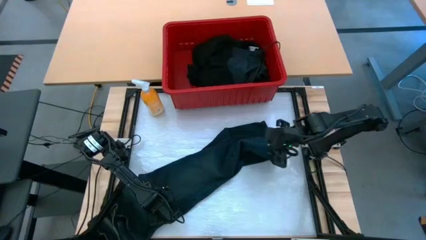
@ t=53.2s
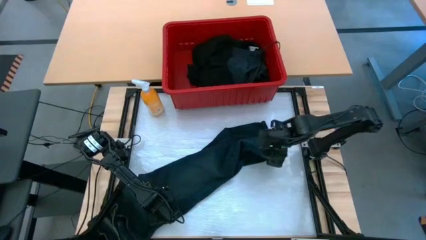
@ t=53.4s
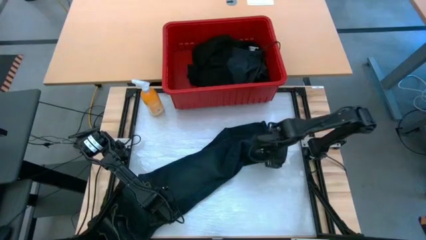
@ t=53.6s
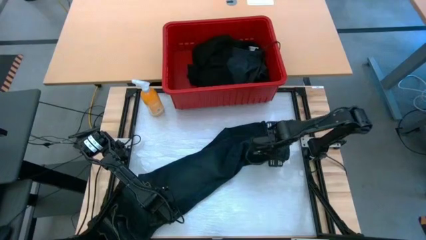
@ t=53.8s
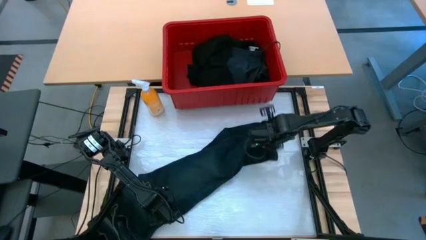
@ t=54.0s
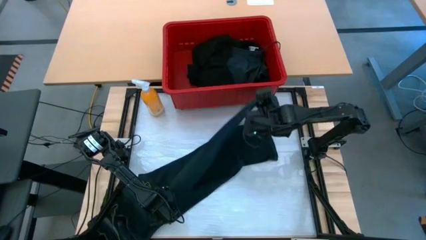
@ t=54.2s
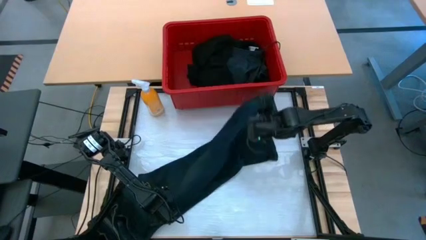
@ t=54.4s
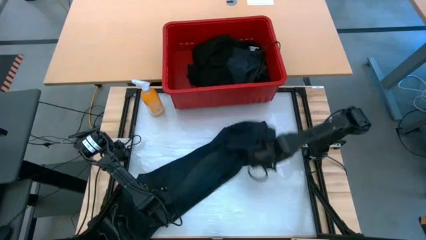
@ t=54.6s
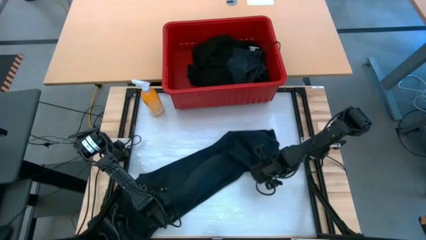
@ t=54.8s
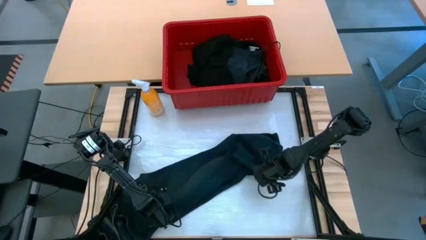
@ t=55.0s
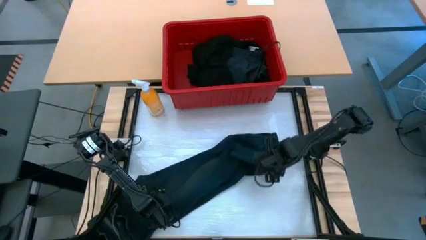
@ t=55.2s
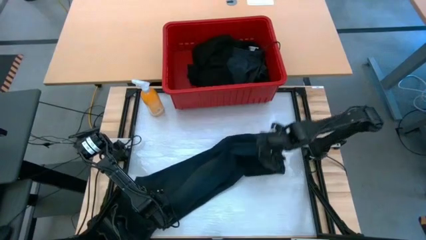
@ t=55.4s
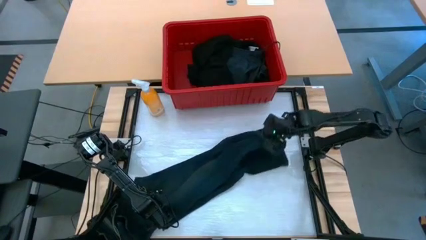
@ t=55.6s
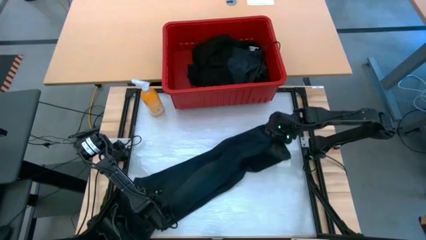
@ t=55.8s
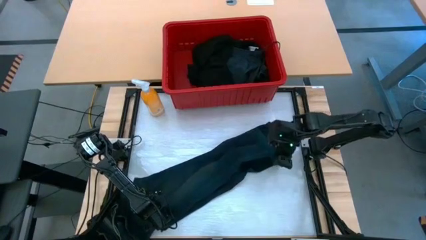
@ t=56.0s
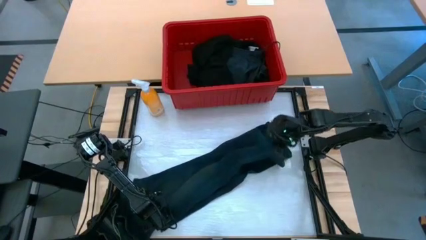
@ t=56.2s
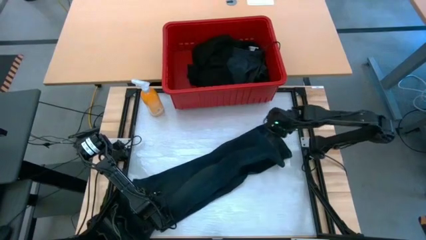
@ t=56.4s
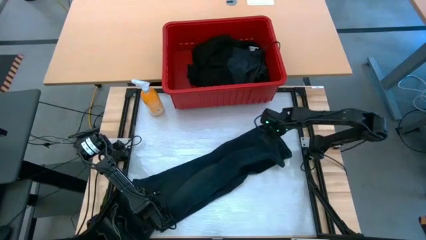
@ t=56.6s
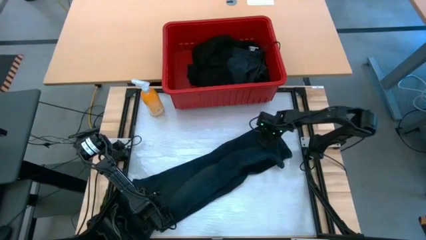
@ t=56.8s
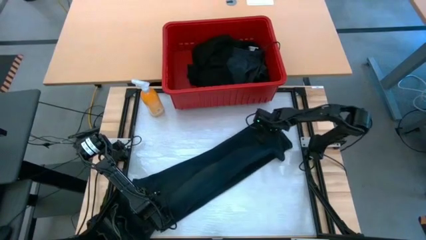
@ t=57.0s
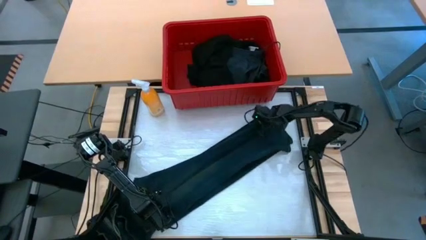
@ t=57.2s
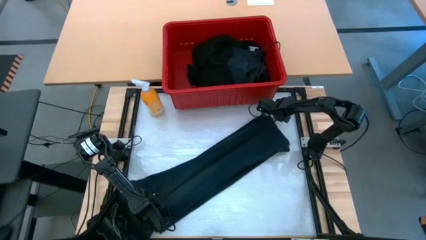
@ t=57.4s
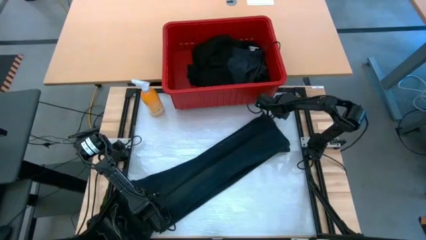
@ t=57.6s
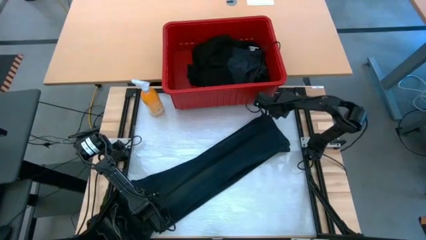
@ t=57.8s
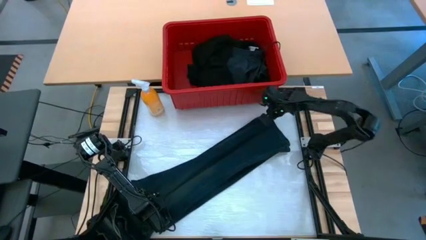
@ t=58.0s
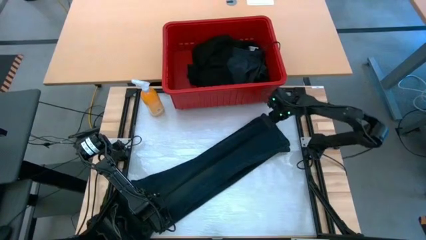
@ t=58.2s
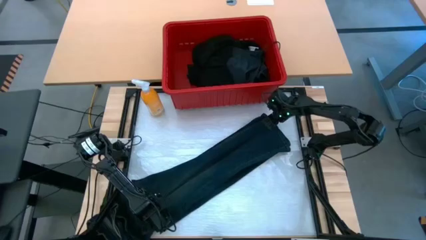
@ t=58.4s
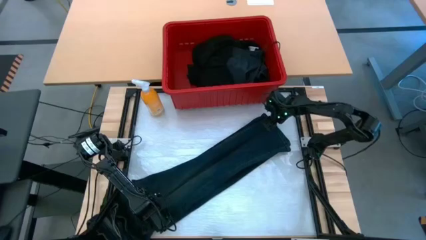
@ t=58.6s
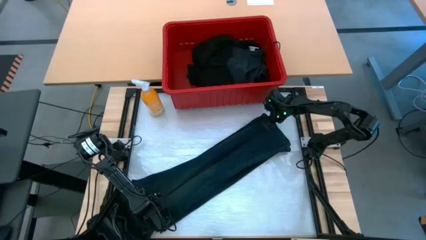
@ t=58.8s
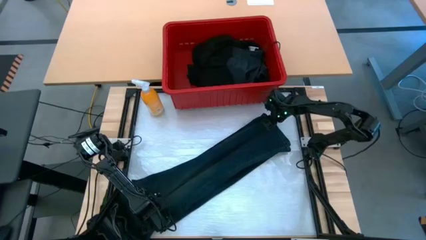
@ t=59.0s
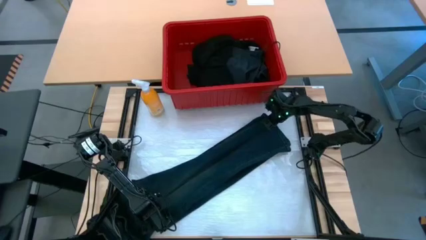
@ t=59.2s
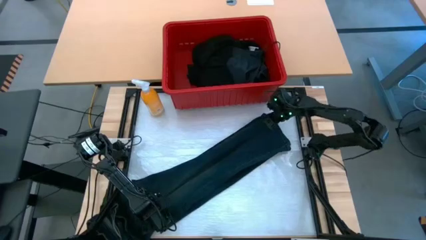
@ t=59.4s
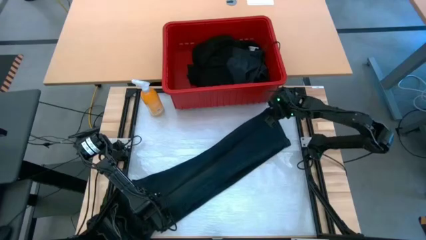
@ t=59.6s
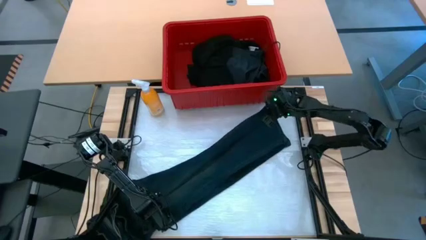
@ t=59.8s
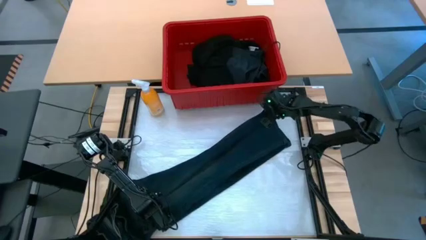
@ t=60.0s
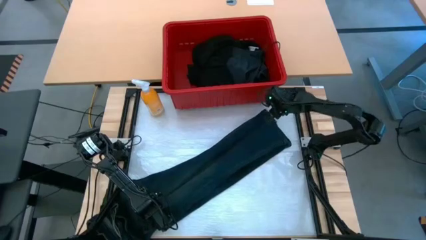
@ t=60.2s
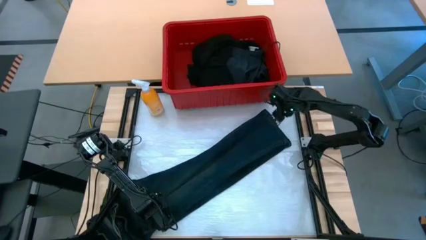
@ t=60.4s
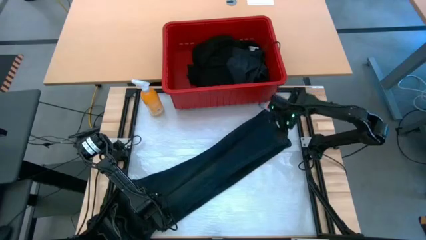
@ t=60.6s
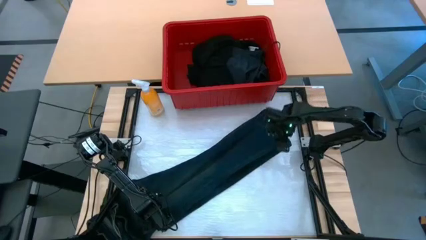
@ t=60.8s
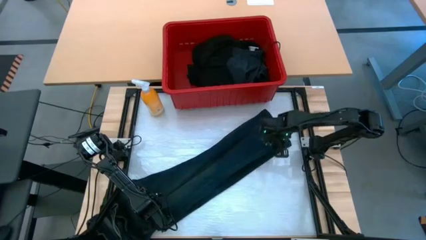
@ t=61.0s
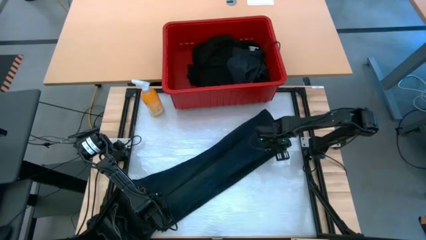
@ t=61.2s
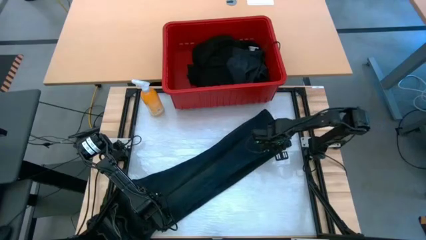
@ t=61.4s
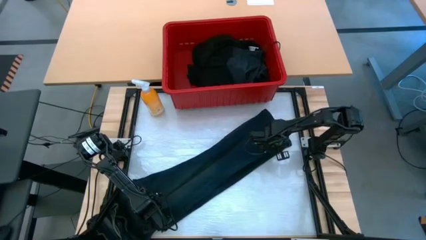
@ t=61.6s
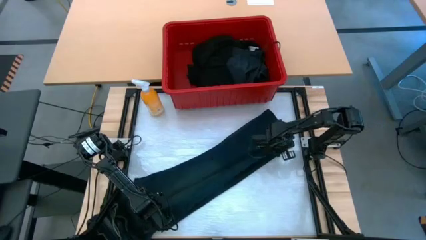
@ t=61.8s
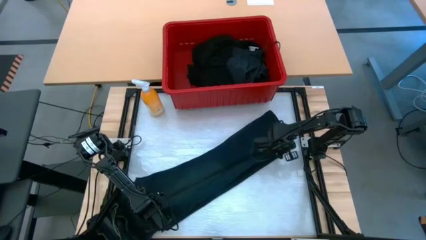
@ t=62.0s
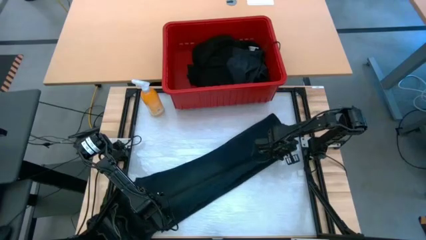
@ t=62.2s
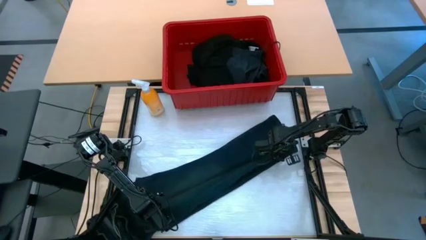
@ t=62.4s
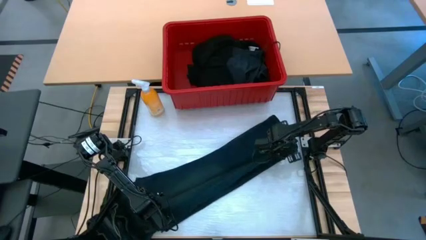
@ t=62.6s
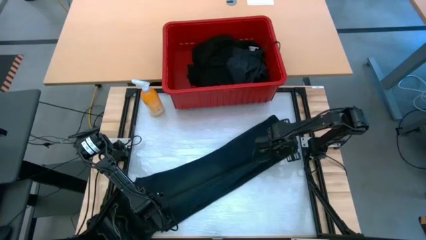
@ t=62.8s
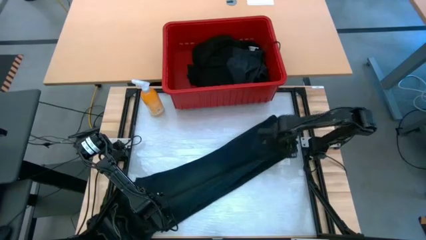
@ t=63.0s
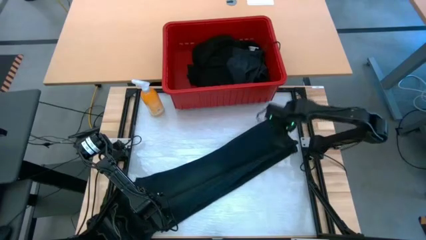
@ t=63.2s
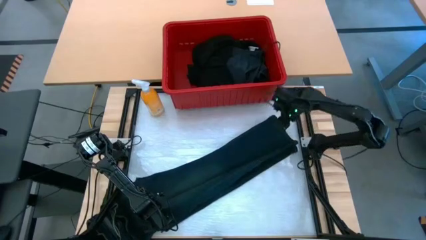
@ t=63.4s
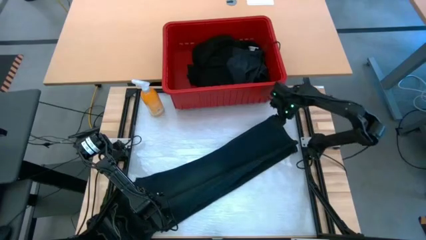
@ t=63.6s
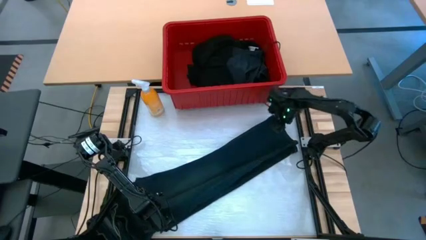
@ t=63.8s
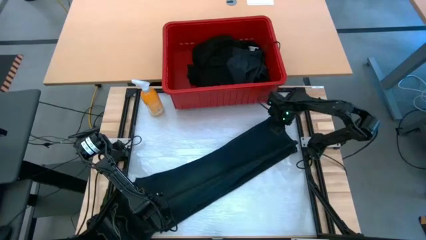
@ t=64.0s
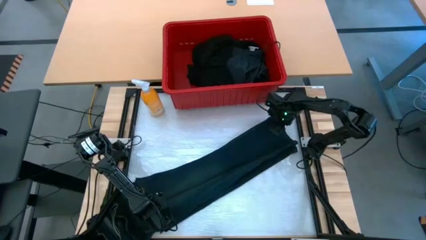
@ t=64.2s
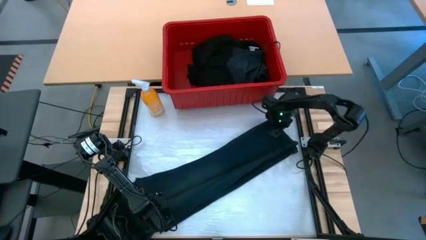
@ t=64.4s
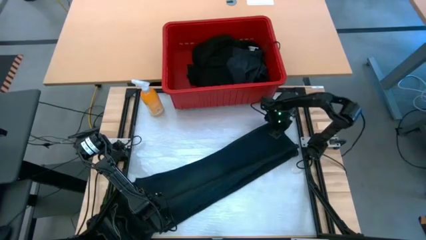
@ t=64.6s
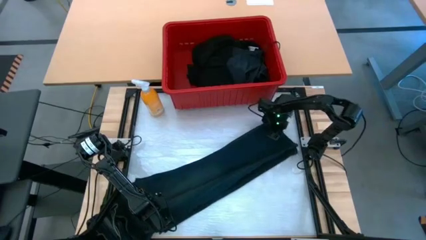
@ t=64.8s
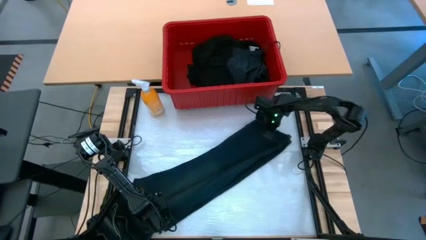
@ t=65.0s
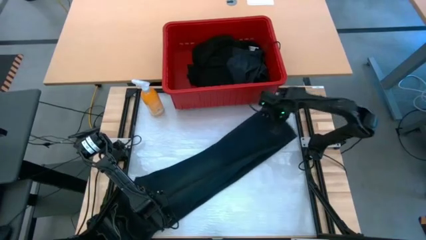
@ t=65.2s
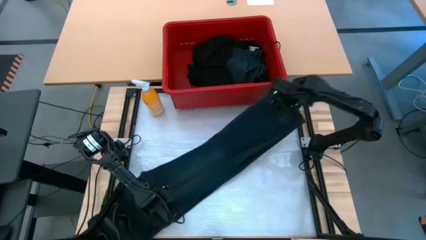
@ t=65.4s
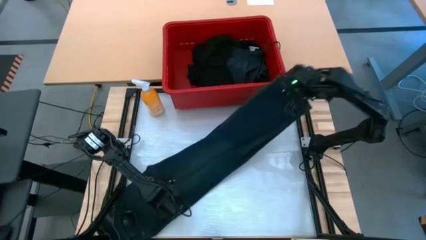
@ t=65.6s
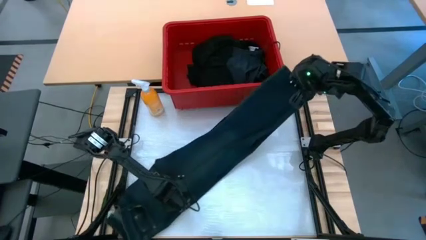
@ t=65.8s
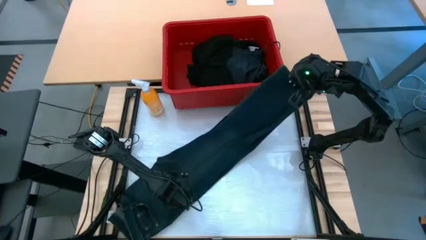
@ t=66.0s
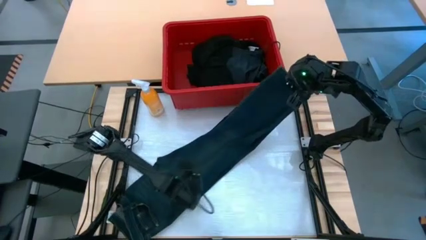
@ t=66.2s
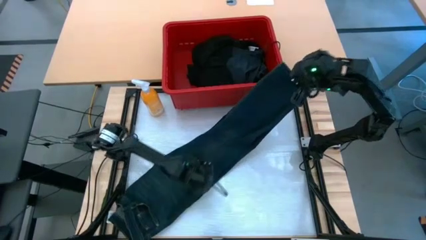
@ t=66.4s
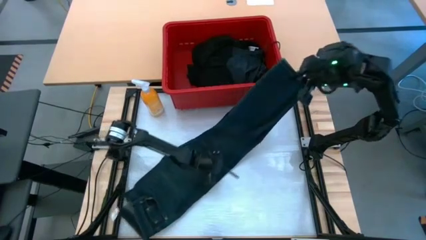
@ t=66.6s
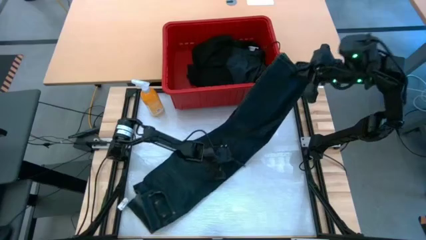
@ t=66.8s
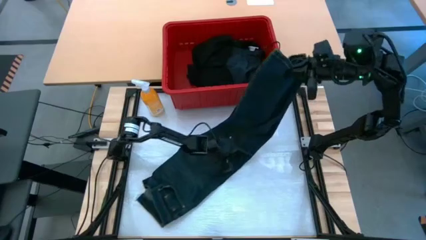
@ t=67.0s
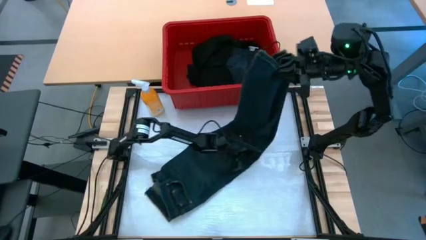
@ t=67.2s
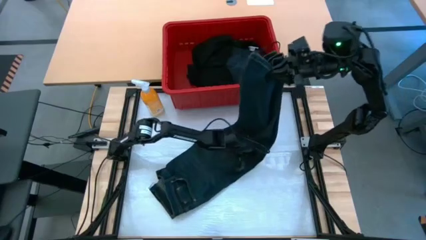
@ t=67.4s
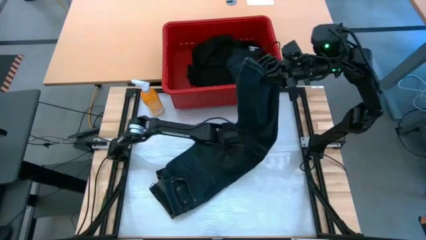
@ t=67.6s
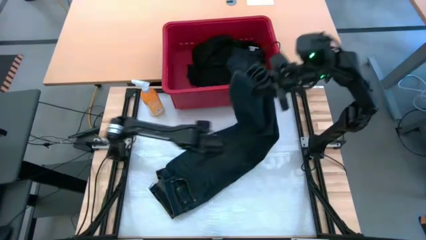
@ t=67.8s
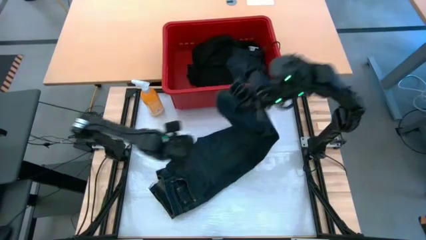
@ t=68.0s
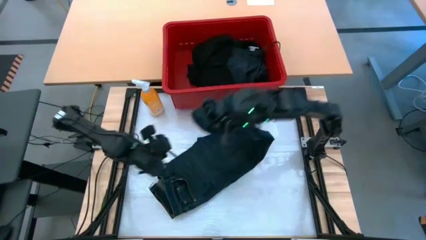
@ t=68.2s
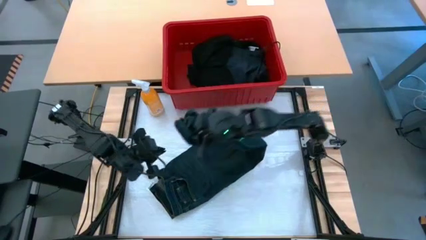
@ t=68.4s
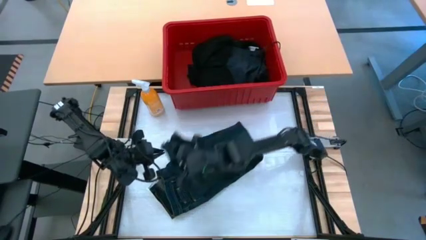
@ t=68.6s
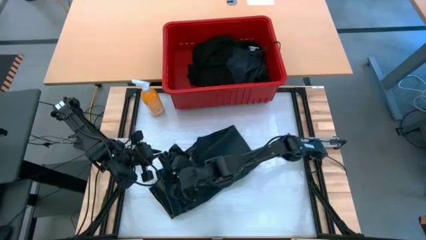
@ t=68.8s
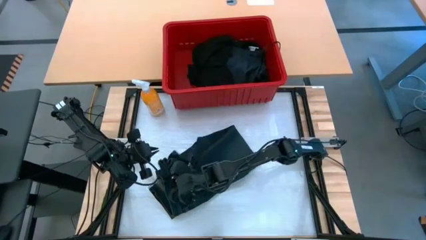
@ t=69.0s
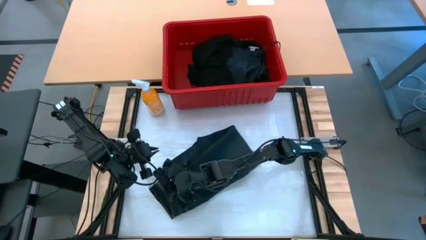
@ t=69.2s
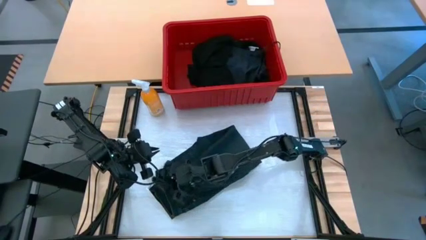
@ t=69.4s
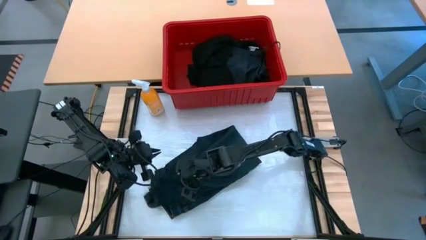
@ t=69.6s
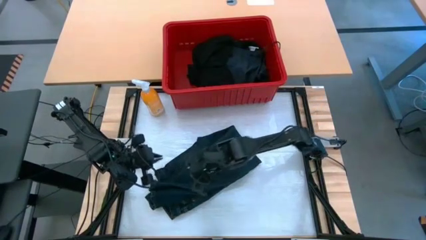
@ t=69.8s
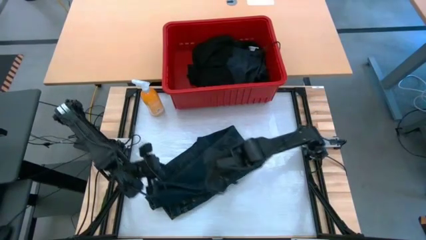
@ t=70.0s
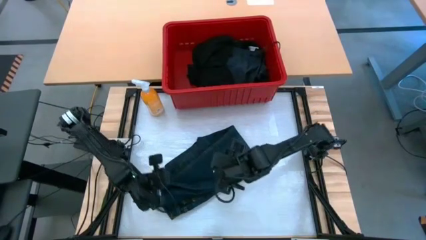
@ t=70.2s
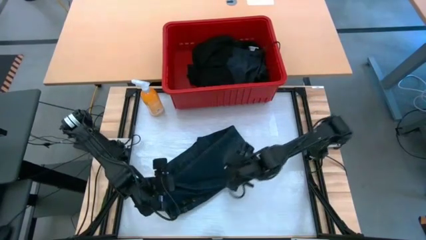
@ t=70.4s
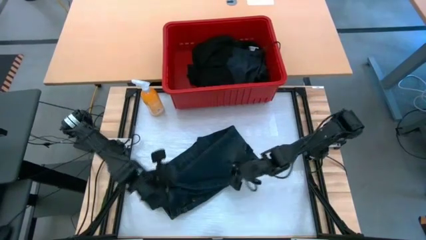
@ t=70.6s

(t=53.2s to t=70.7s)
Task: Fold Laundry from Bin
Fold the dark blue pants
